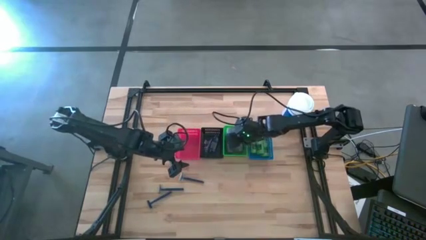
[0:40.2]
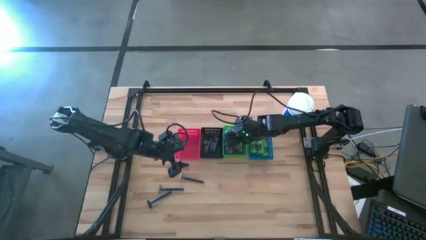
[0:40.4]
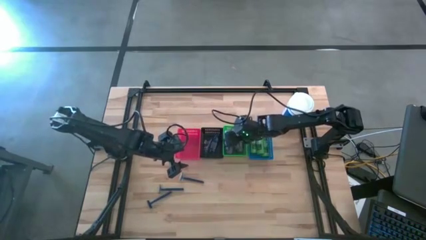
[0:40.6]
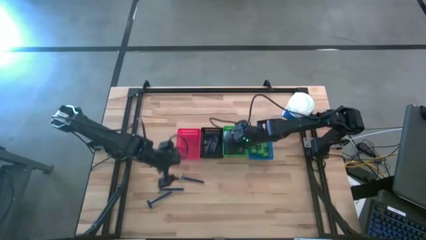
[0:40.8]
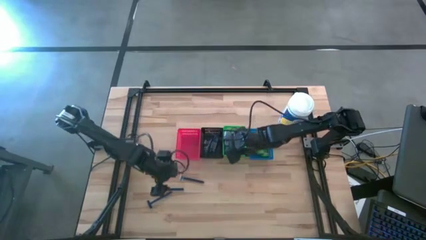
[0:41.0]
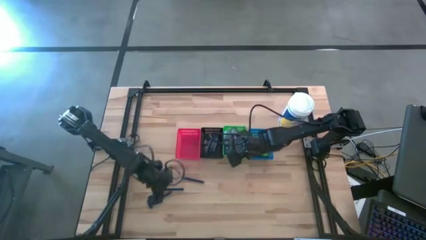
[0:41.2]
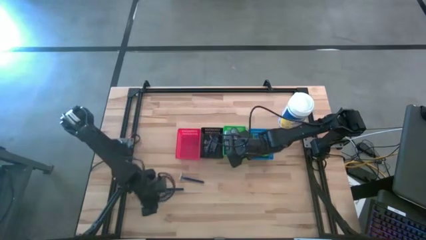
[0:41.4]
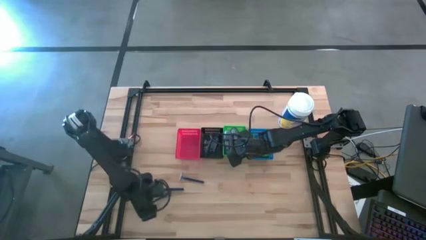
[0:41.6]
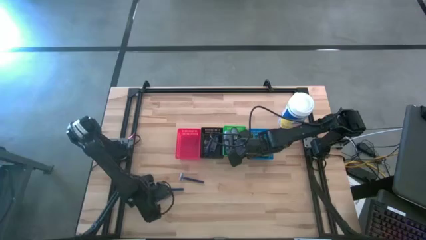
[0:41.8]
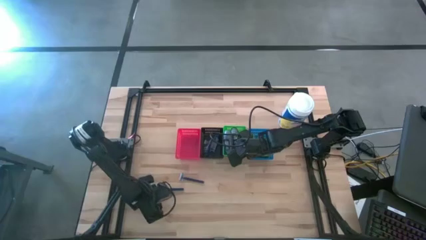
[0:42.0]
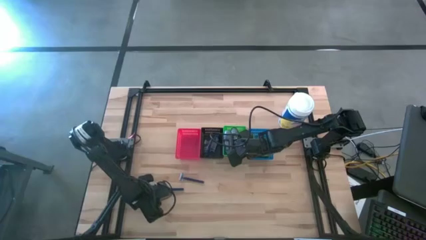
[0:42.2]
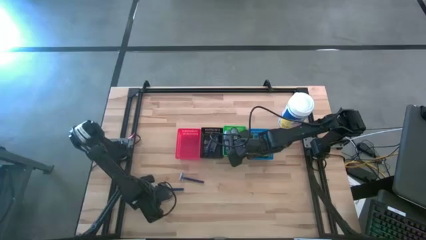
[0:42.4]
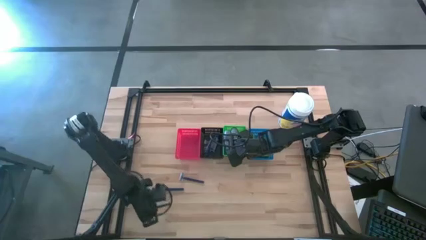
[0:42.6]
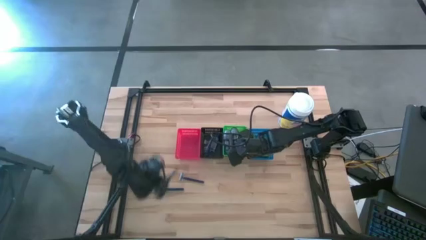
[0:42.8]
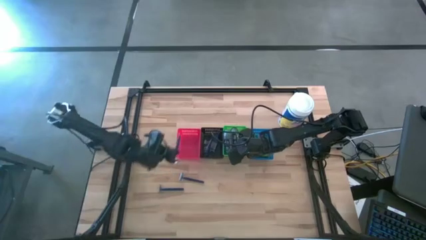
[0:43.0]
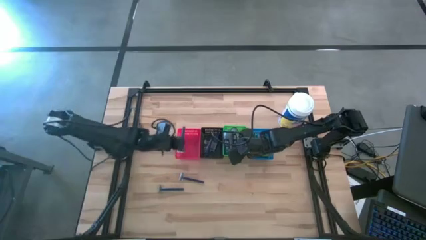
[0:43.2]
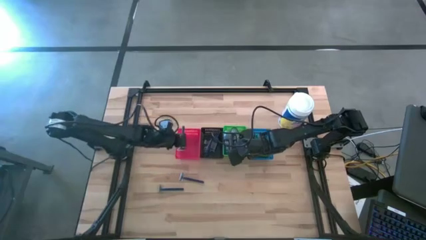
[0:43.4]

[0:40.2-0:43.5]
Task: Pick & Place Travel size toiletries
Put the blue razor into the red bin

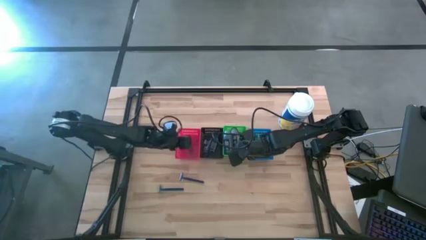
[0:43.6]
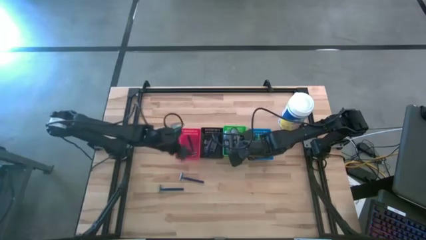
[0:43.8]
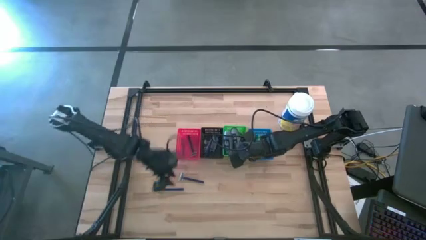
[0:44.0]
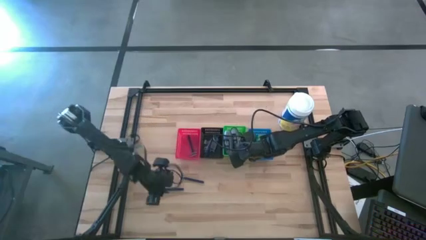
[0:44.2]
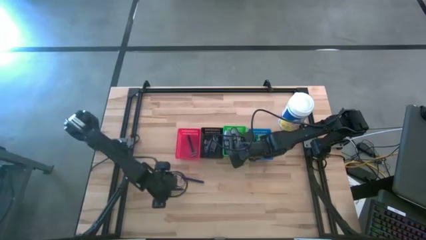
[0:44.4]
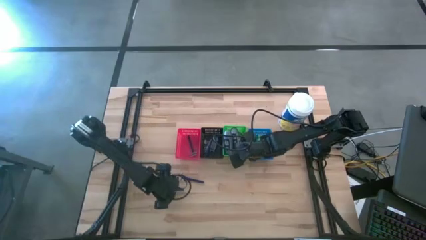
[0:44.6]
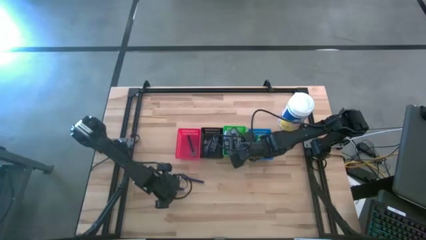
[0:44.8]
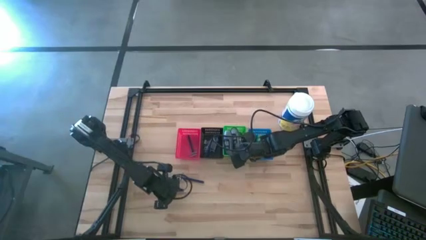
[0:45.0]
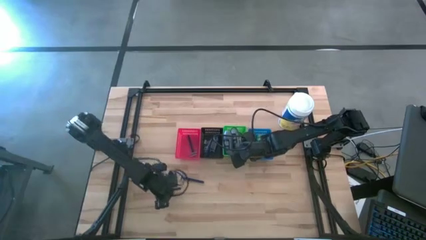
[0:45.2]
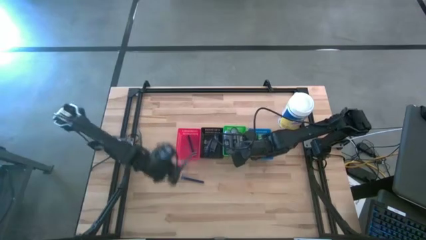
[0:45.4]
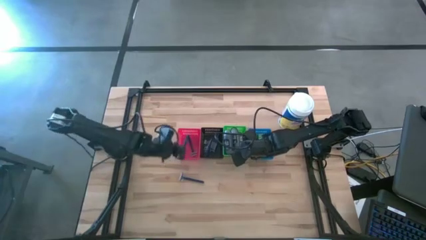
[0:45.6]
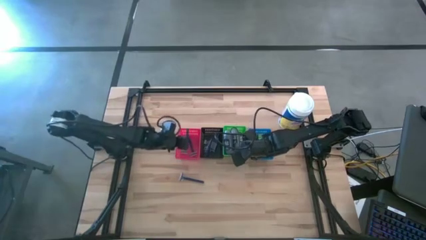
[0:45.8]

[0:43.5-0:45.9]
Put the blue razor into the red bin

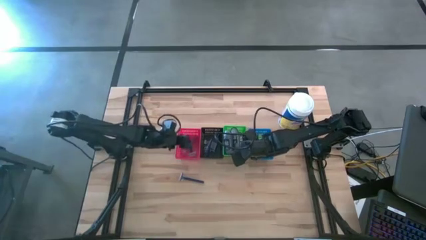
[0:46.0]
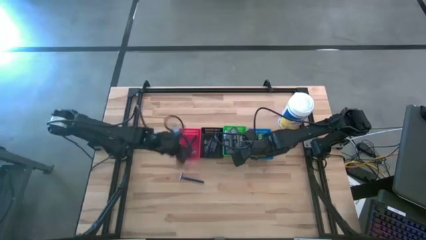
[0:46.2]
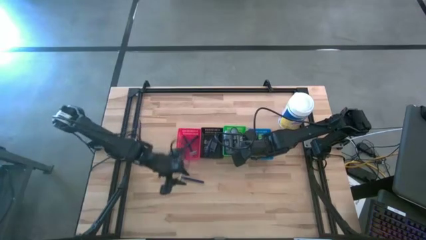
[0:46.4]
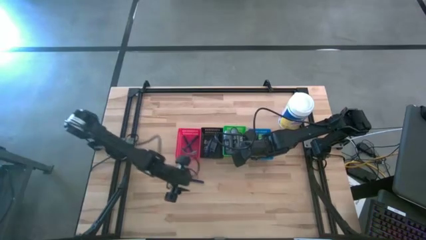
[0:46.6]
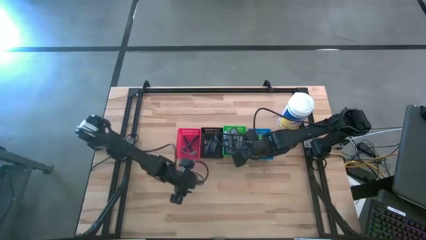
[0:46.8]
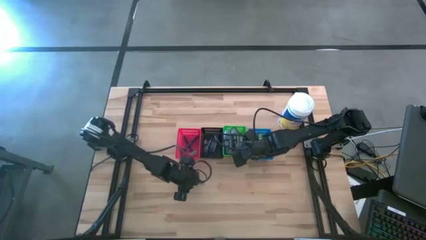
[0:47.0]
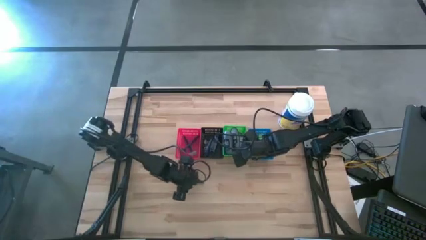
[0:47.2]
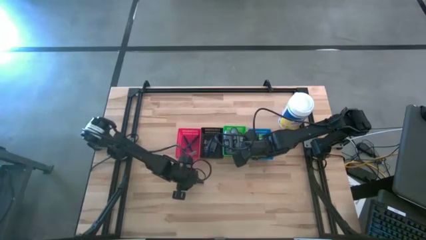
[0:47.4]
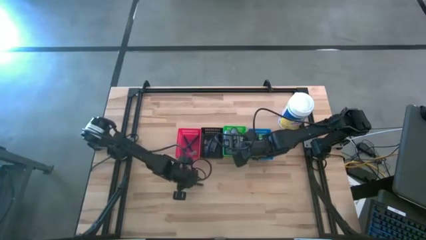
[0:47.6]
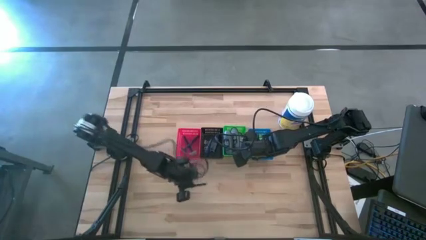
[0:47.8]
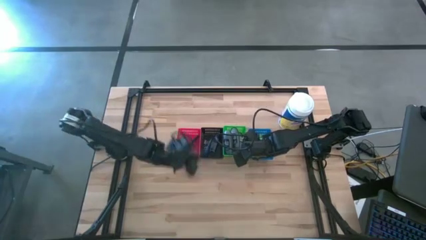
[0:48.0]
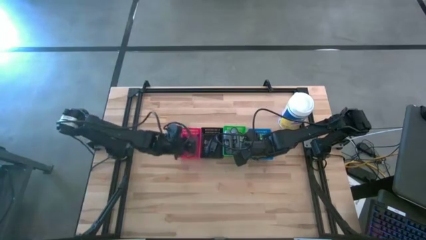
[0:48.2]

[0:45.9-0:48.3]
Put the blue razor into the red bin

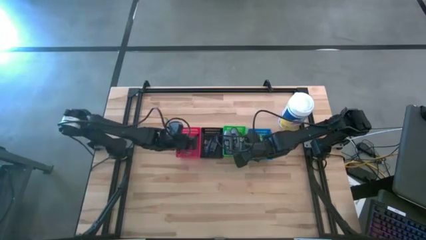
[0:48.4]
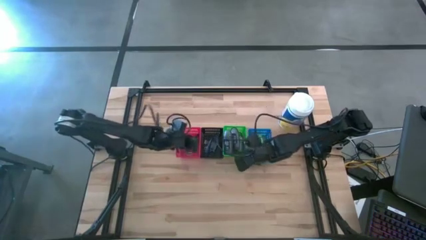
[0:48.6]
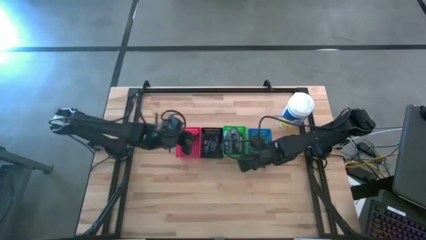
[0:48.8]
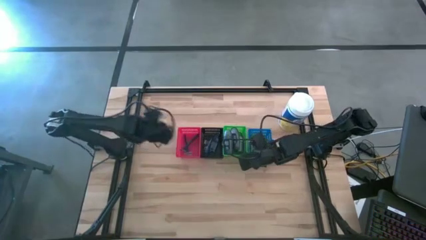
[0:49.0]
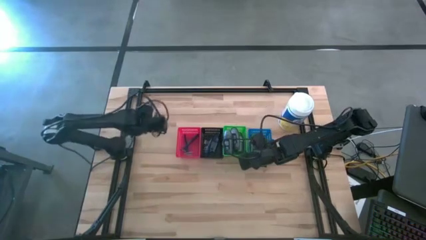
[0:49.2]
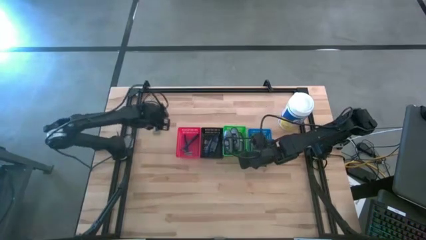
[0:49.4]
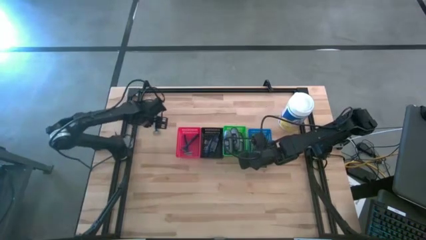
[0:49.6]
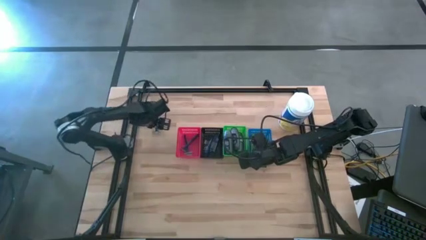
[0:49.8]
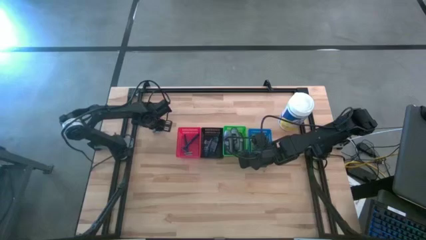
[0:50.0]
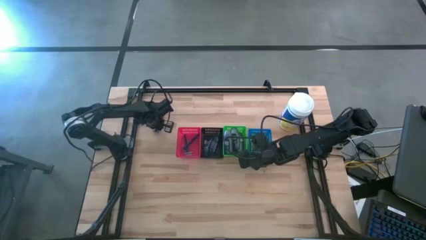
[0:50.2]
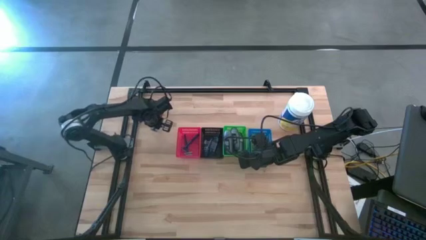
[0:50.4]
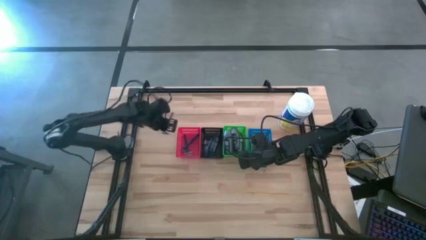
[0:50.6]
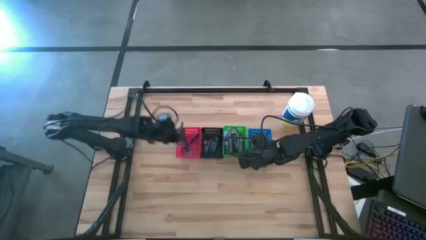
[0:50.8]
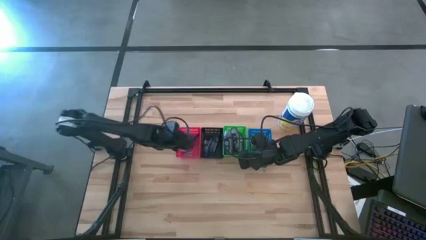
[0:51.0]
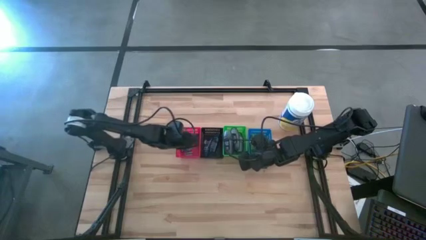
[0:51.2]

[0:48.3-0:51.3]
Put the blue razor into the red bin

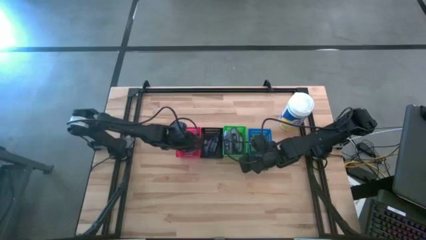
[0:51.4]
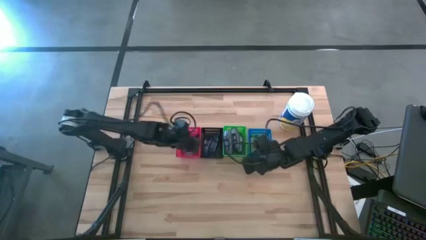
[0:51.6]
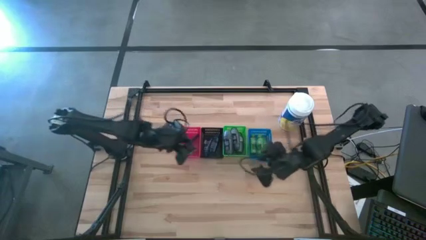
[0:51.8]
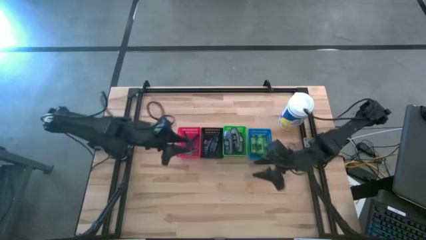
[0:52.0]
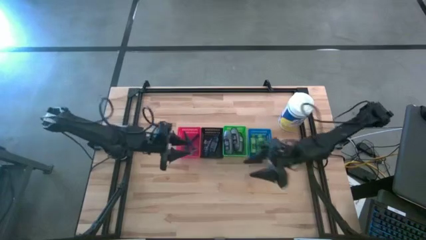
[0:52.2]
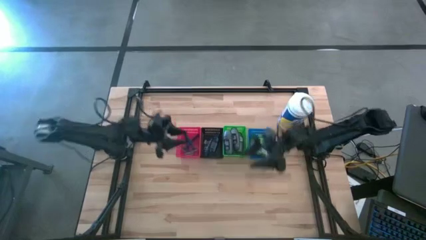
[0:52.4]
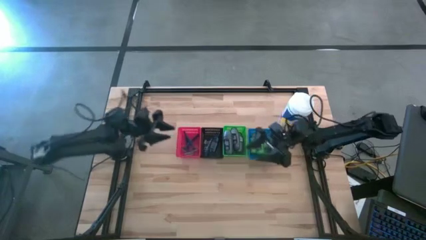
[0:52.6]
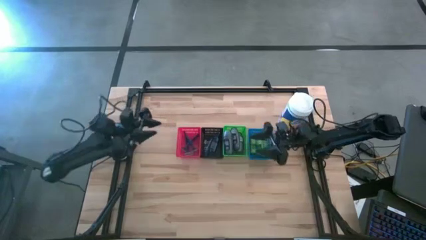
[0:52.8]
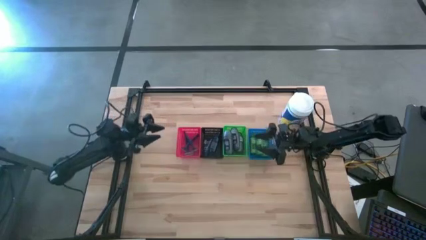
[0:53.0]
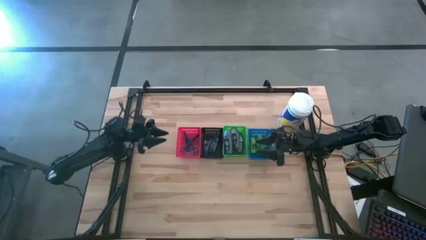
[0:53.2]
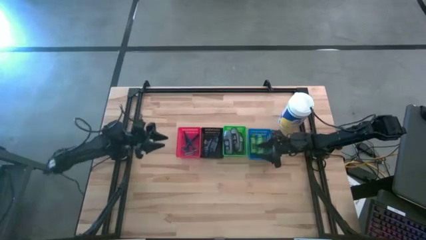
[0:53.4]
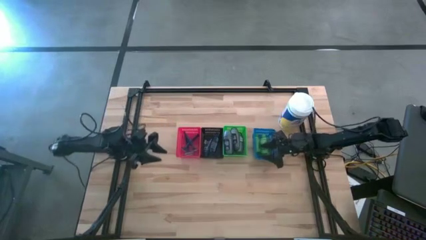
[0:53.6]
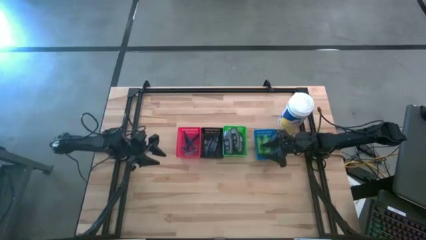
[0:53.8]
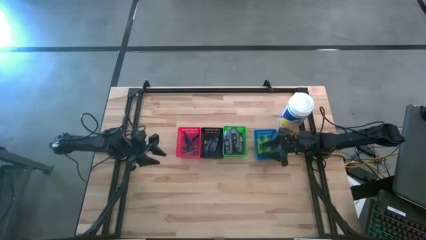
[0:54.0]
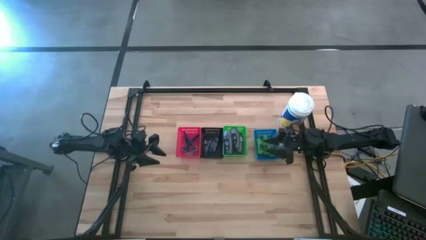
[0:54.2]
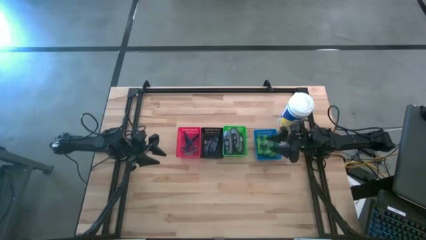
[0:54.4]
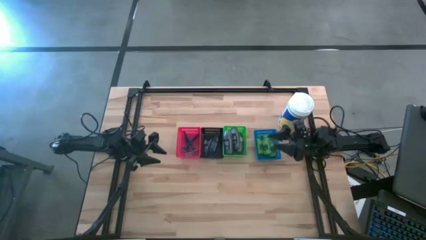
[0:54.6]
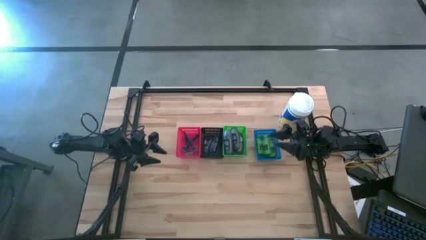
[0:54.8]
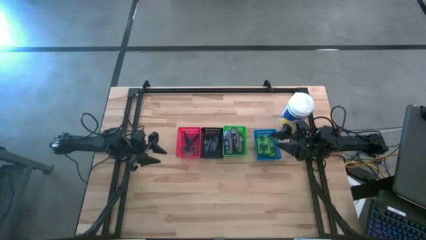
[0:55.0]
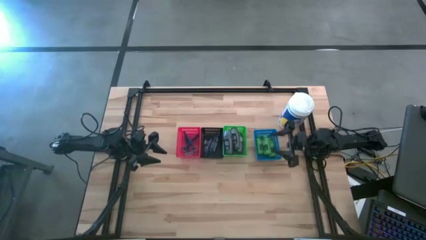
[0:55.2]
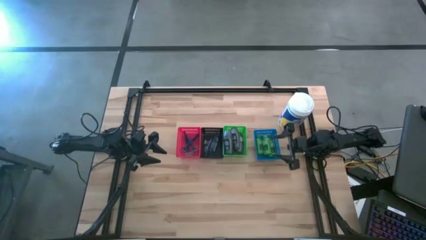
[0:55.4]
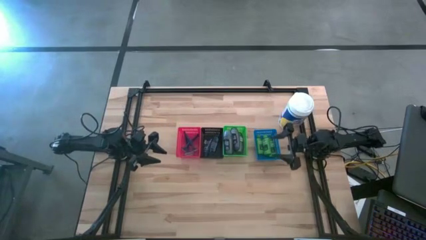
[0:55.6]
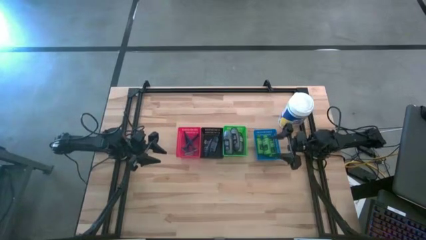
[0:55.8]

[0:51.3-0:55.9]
Return to Home Position
